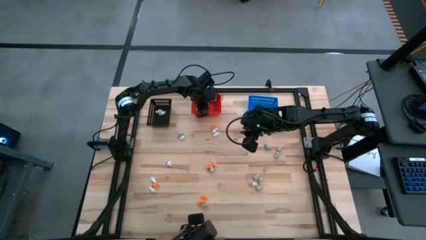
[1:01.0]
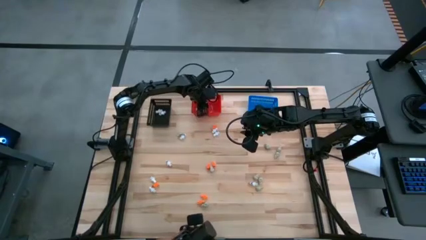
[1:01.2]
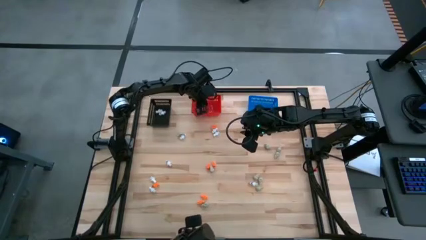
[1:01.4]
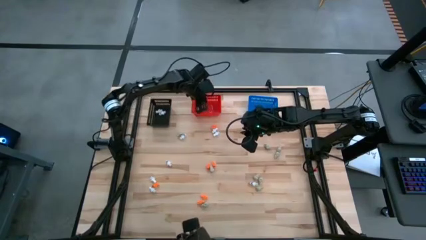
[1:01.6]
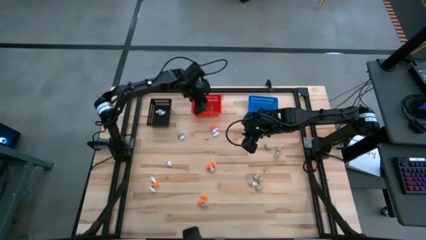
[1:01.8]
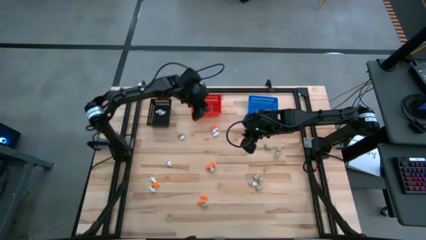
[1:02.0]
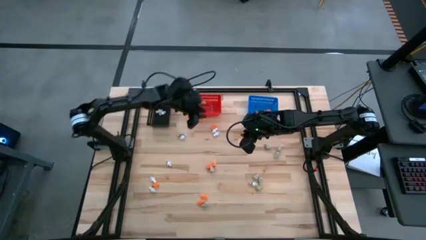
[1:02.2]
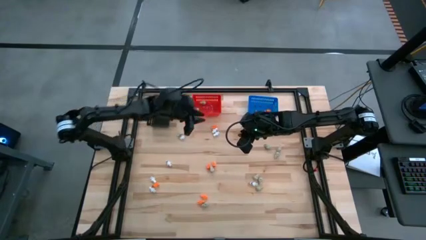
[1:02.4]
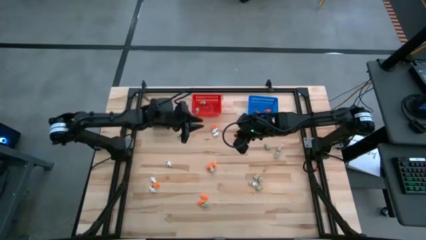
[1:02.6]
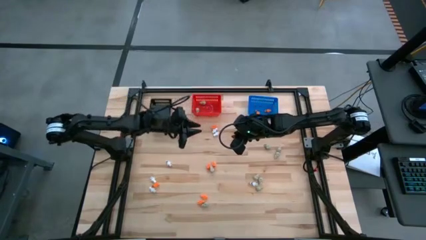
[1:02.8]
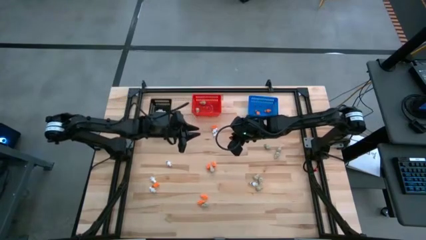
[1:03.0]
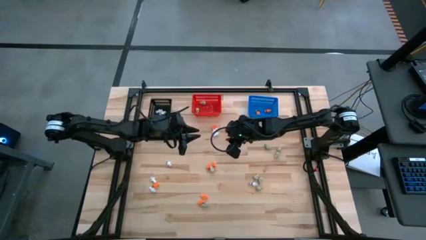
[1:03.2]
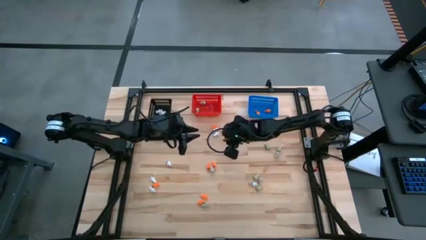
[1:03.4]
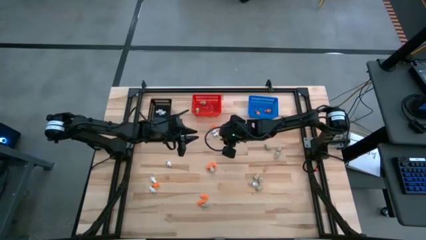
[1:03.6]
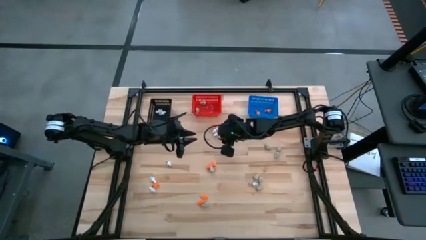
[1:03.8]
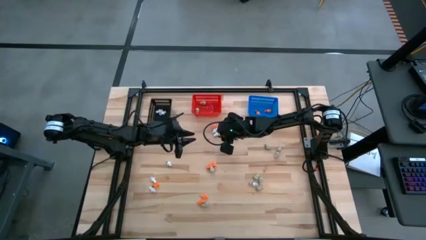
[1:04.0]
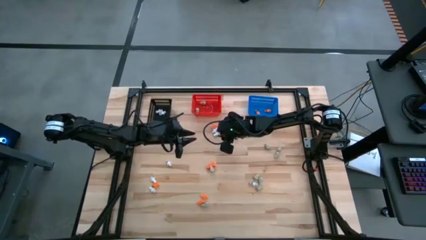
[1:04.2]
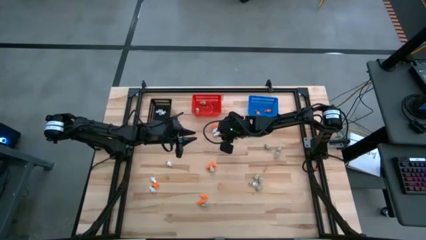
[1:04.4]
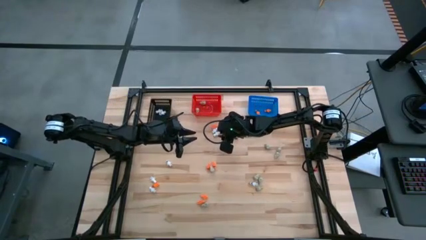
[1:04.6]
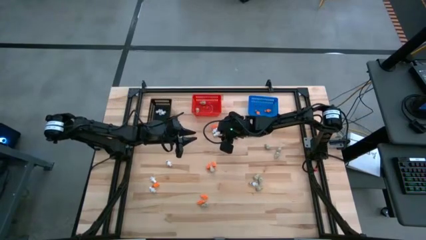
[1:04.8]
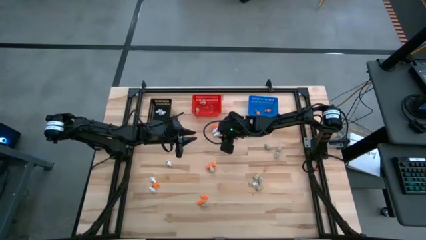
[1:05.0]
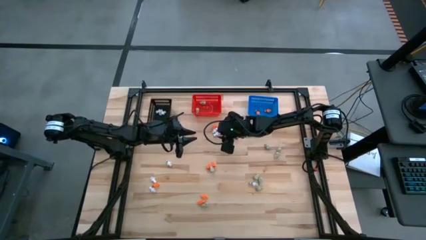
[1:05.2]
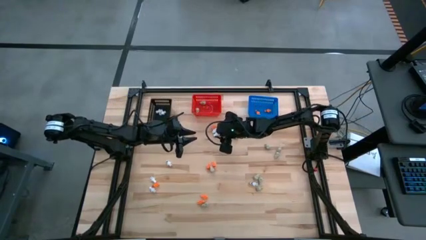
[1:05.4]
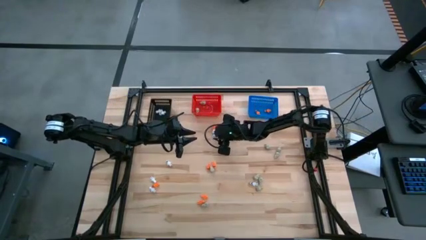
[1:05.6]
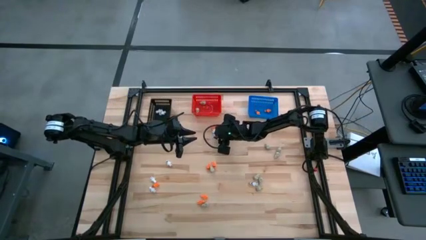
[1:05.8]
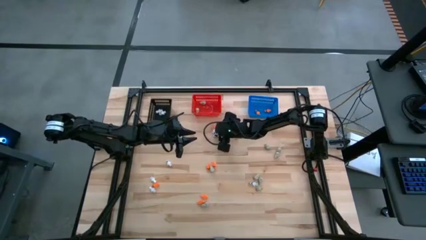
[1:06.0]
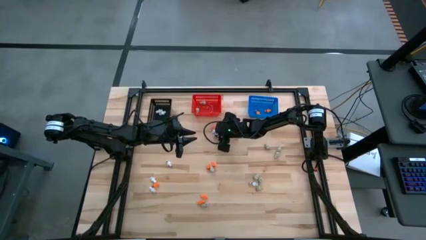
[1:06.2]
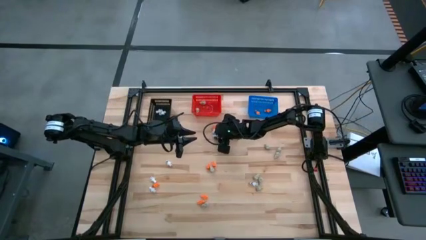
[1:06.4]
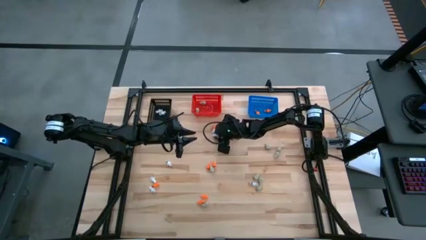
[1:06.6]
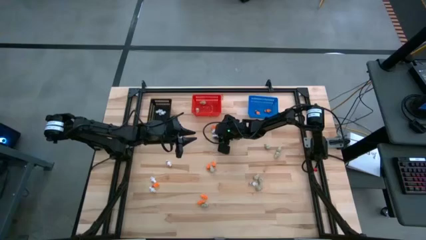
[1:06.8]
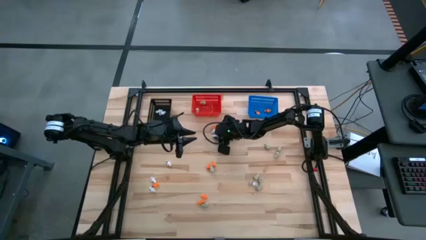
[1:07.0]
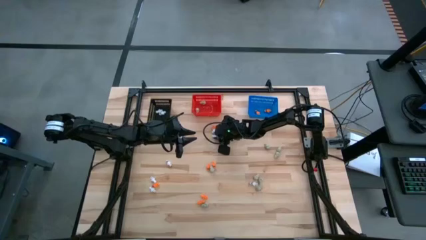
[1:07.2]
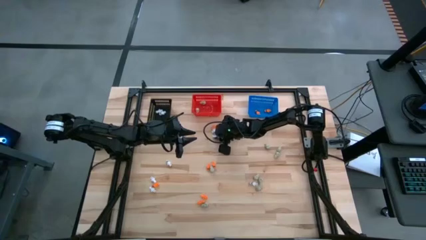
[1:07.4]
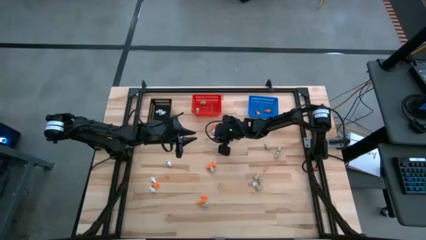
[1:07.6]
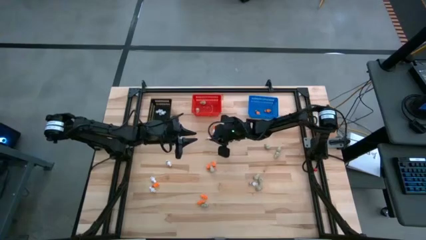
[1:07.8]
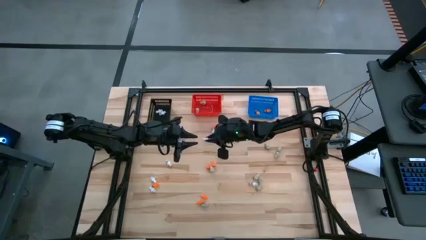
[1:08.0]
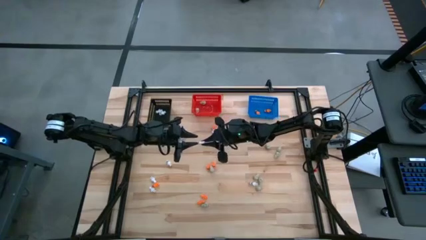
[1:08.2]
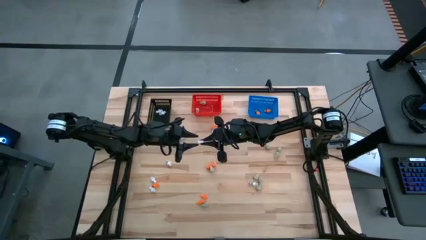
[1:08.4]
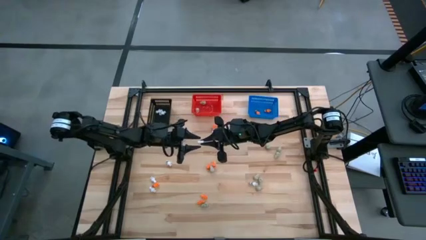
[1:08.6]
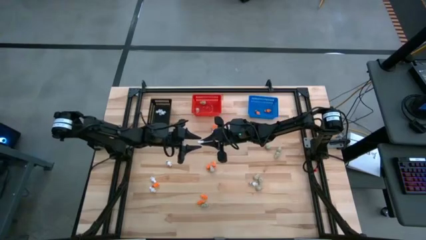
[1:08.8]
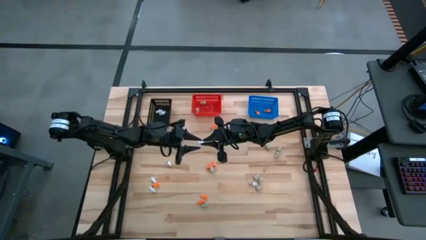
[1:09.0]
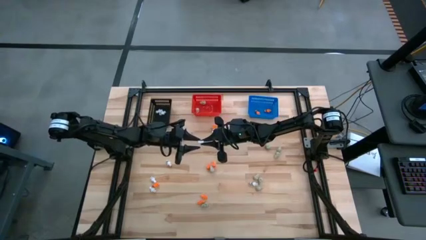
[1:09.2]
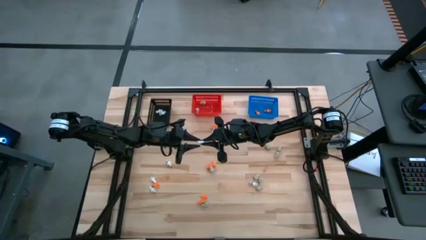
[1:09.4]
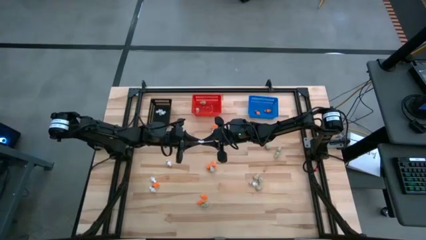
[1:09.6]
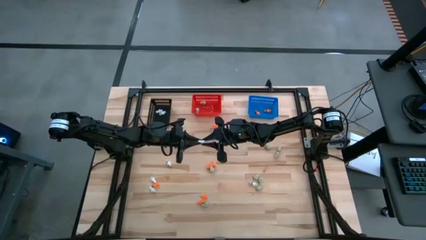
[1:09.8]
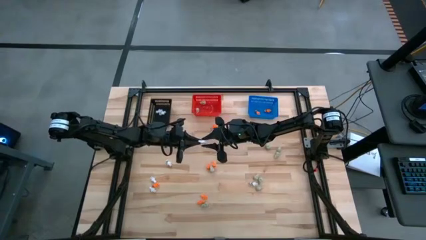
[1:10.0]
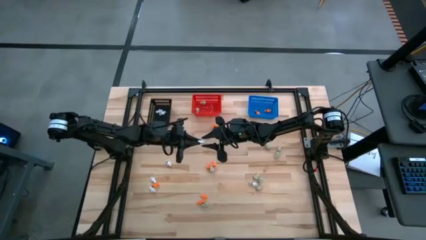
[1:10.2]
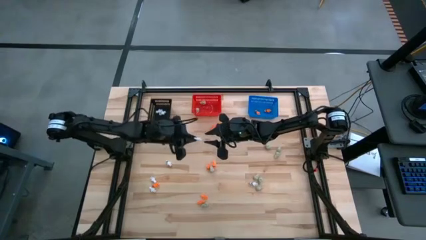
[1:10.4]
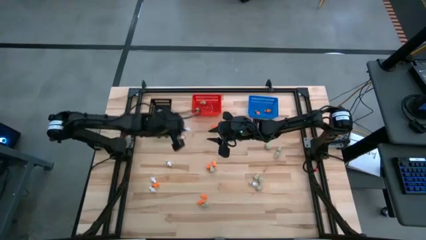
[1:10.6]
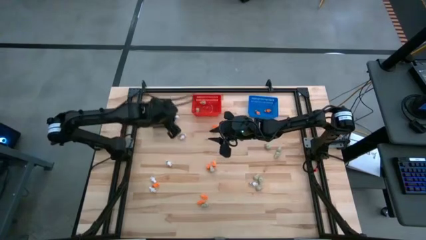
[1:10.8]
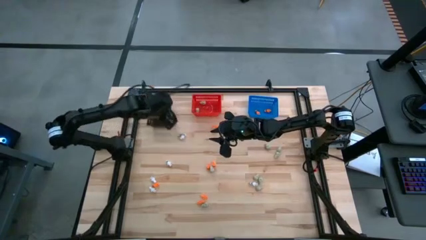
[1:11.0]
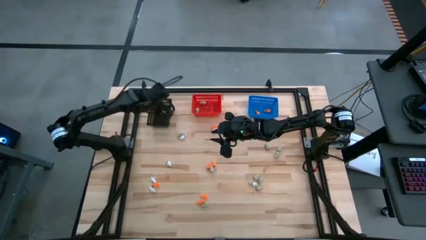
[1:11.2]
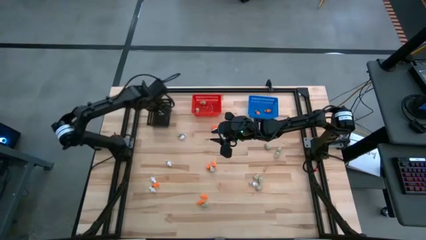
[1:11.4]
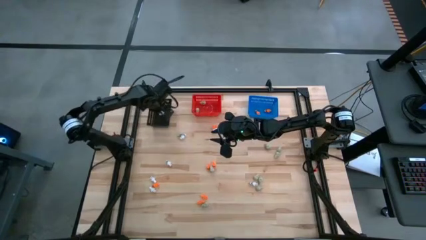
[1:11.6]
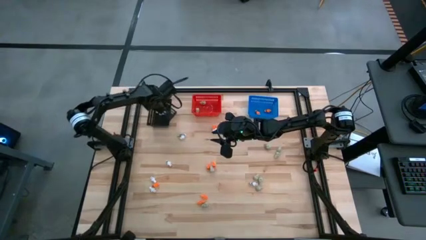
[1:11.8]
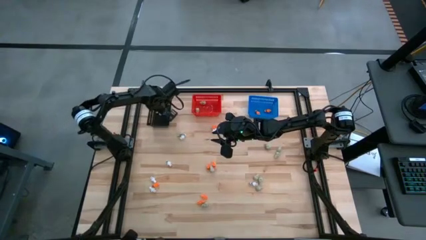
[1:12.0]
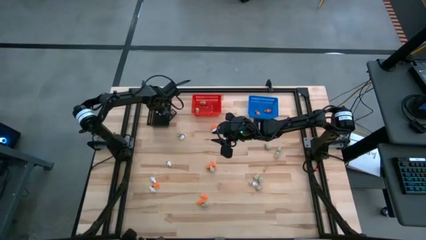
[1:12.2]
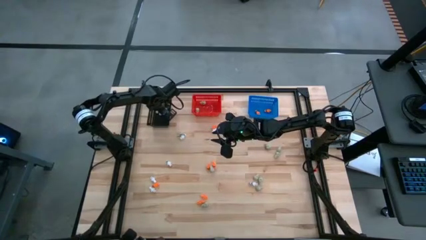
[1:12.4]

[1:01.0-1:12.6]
Task: Sort Halloween decoration
Put the white skeleton toy into the black bin

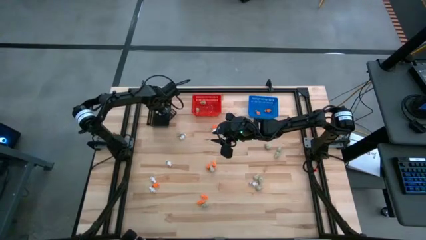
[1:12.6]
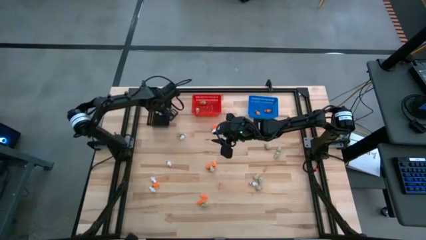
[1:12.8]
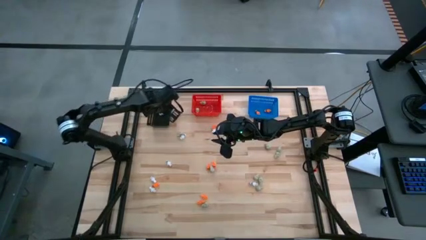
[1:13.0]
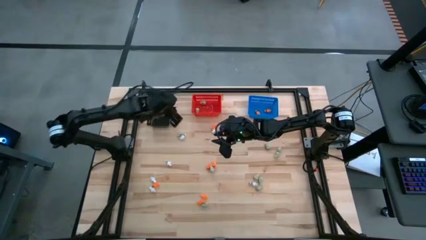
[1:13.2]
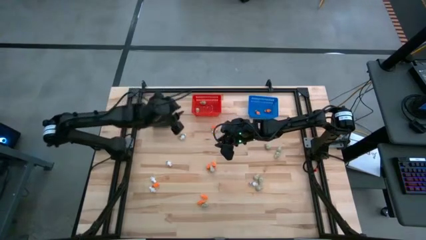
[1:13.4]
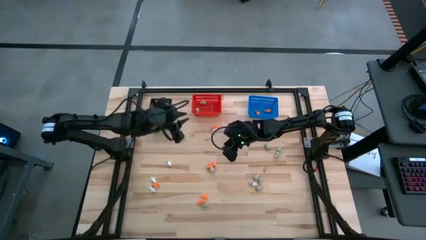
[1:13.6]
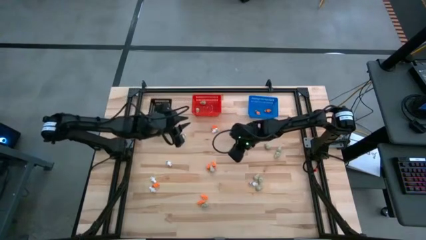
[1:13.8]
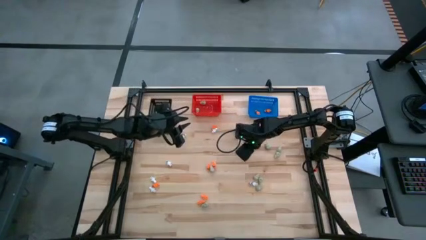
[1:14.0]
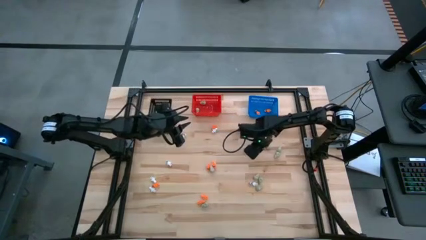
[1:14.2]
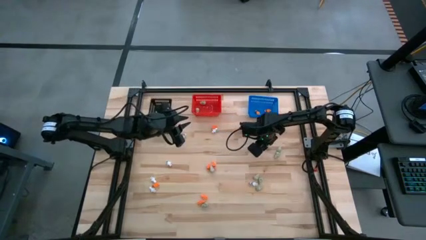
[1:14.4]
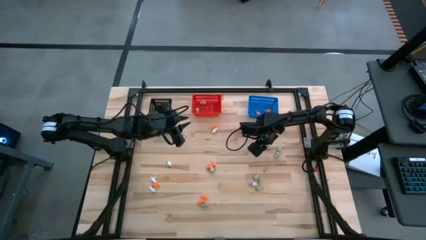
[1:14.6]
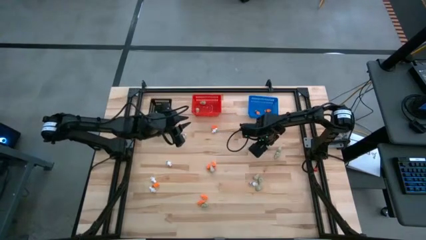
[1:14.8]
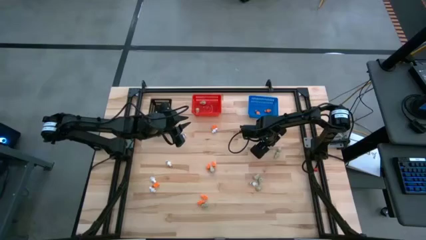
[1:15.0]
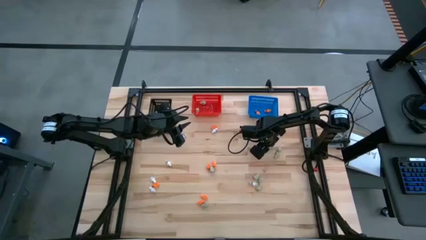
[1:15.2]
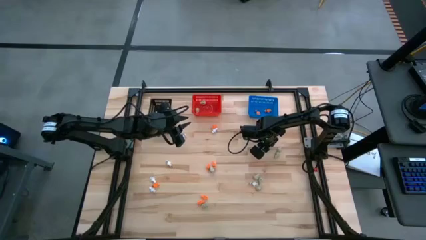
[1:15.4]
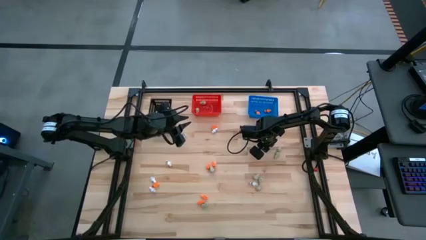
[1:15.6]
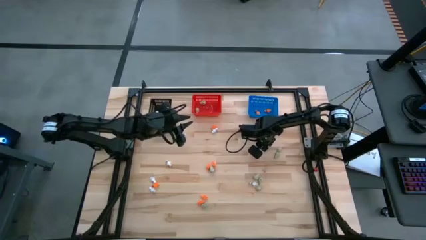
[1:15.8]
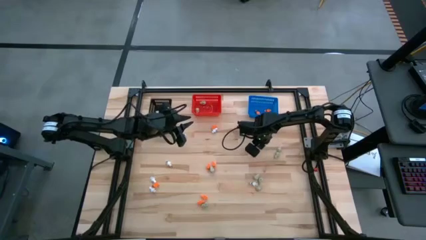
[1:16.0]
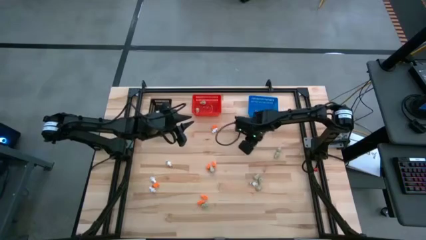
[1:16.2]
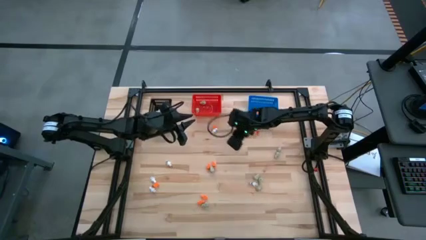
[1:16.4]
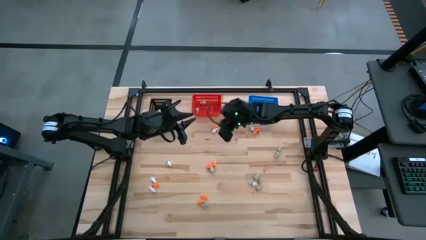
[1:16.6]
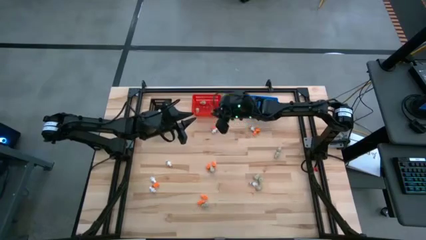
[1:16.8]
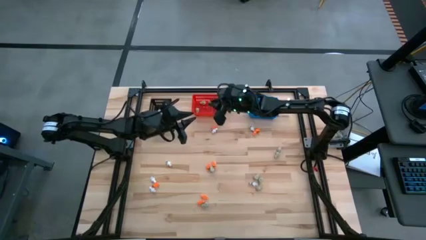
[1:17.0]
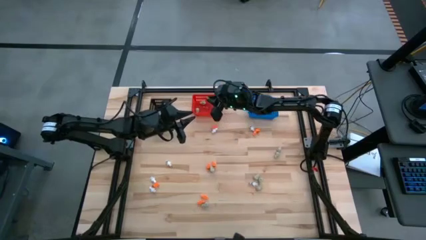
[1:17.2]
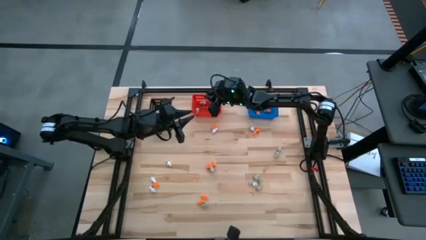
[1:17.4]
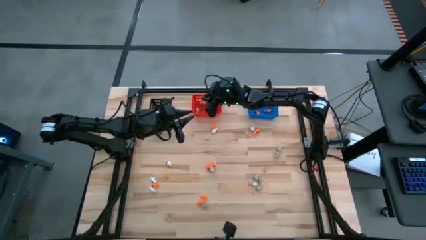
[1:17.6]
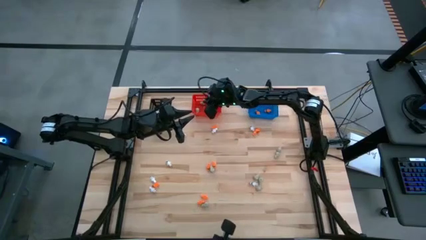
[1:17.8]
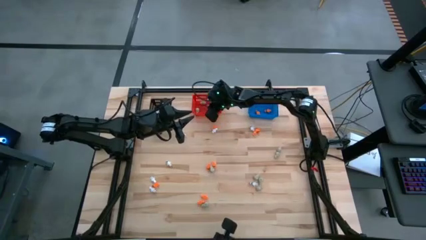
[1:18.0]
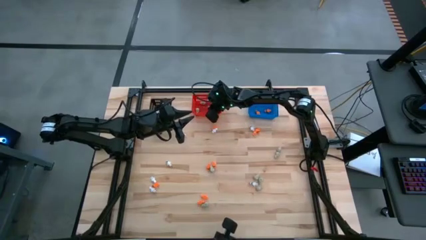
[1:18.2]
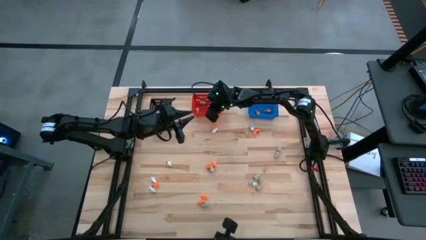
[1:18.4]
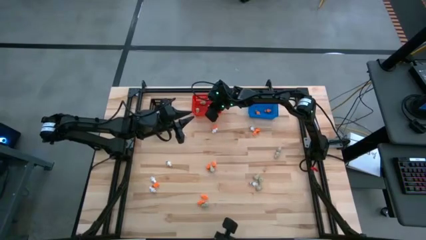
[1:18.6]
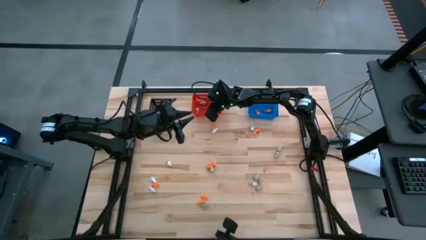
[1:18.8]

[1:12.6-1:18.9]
Put the white skull toy into the red bin
